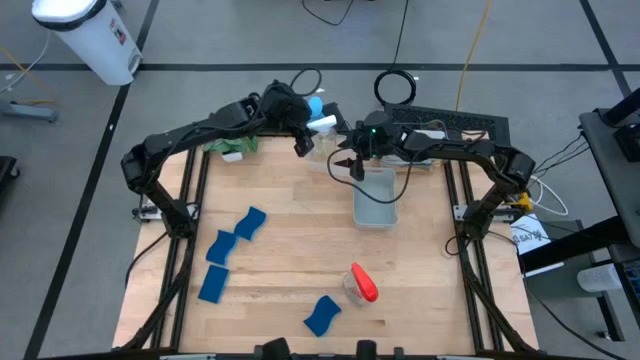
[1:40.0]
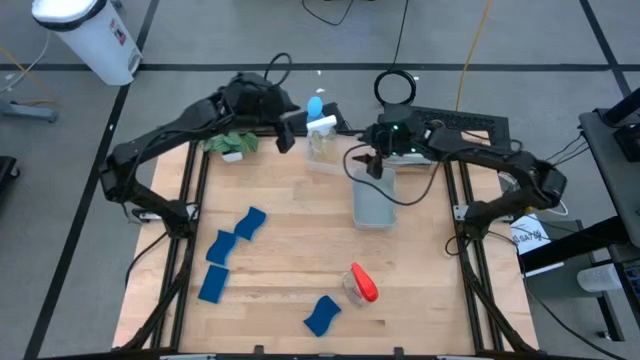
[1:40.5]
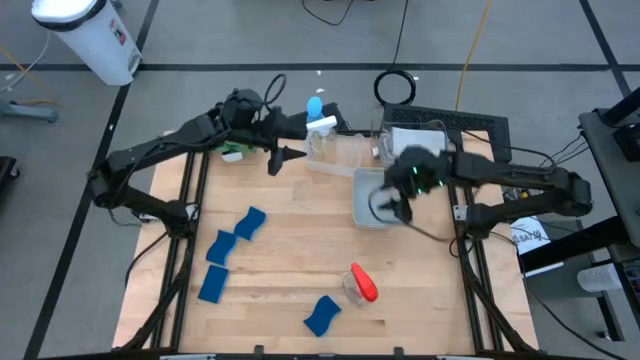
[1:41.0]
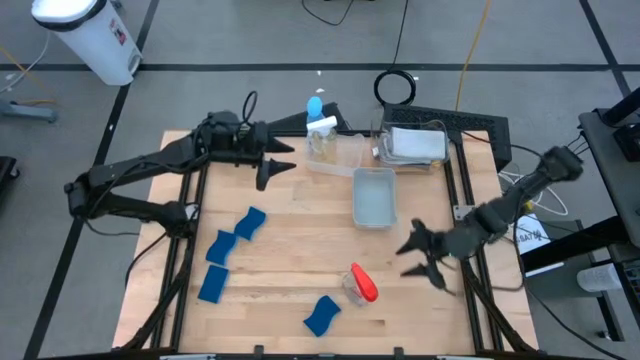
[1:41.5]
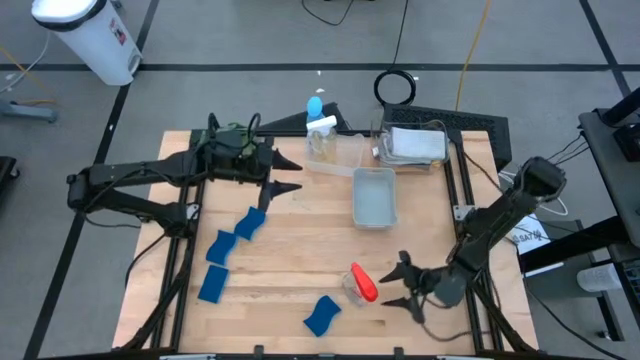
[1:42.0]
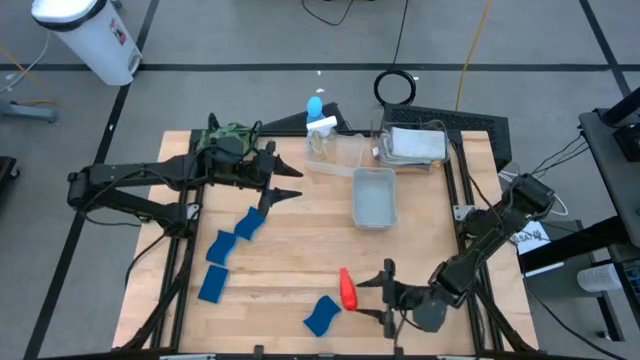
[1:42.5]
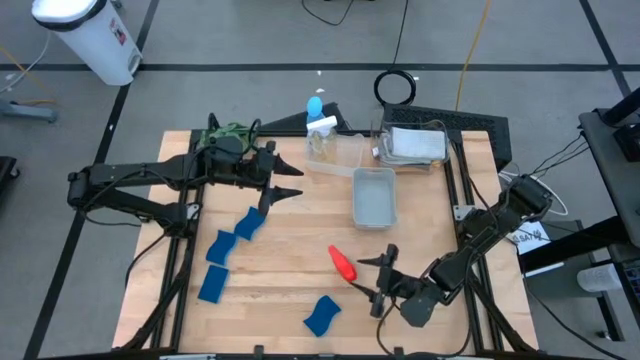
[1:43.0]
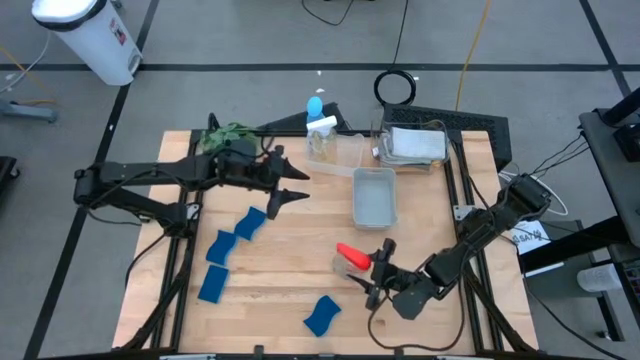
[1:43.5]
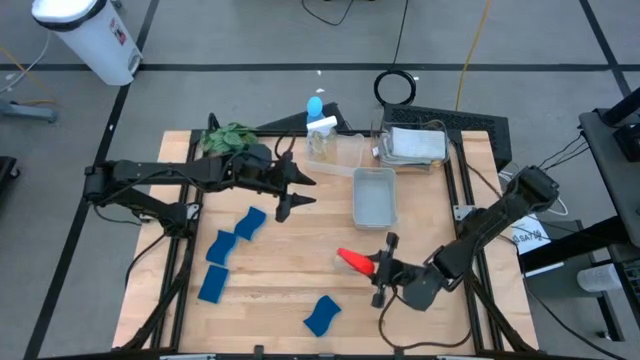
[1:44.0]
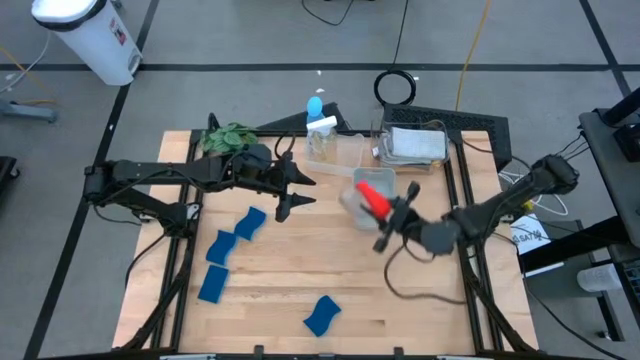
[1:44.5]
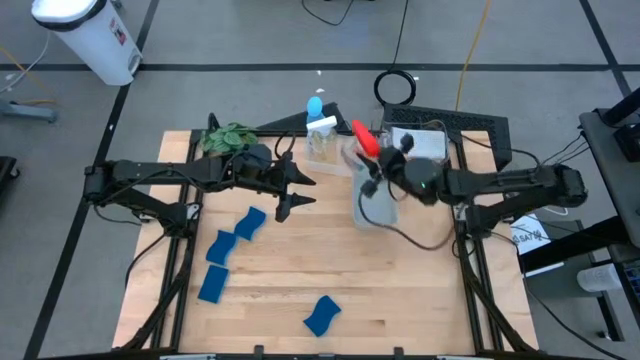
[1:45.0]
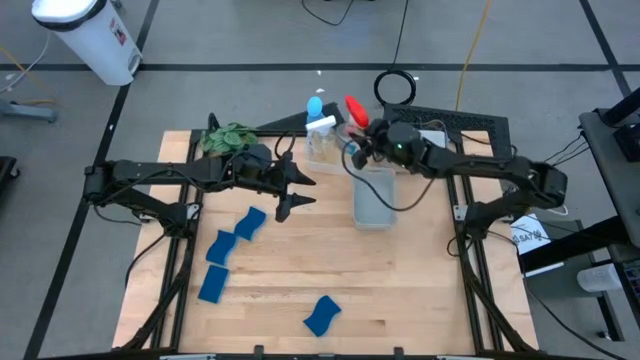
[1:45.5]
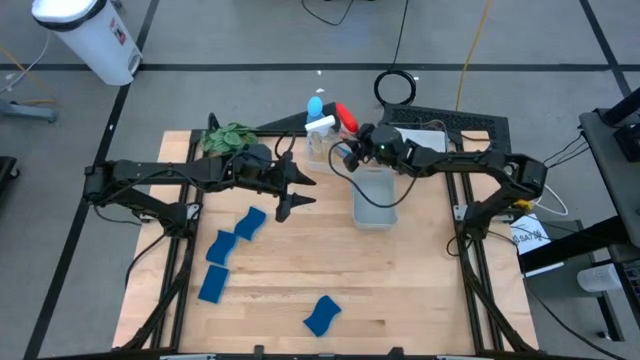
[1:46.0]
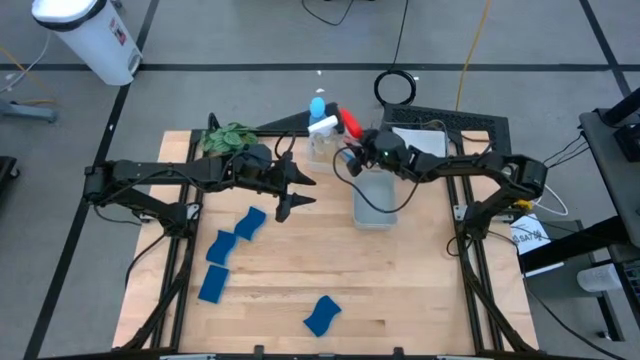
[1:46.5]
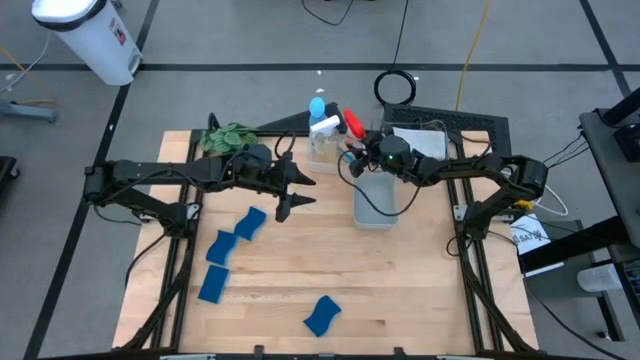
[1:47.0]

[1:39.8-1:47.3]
Task: Pick & Place Kitchen Items
Put the red spray bottle into the white bin

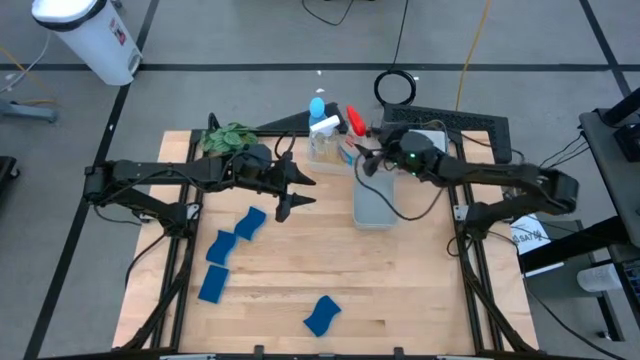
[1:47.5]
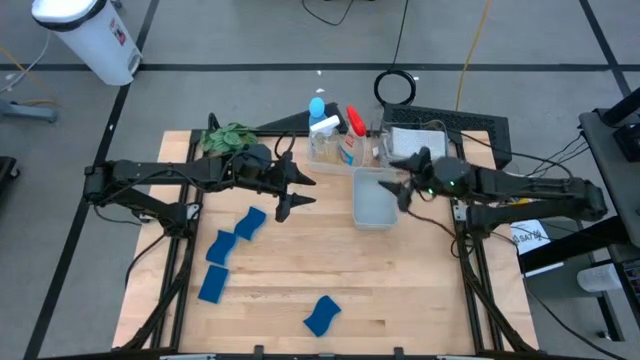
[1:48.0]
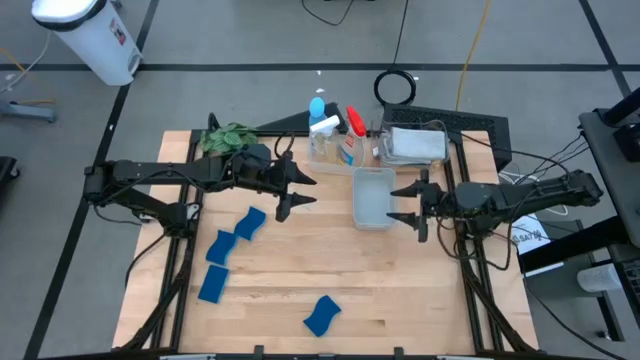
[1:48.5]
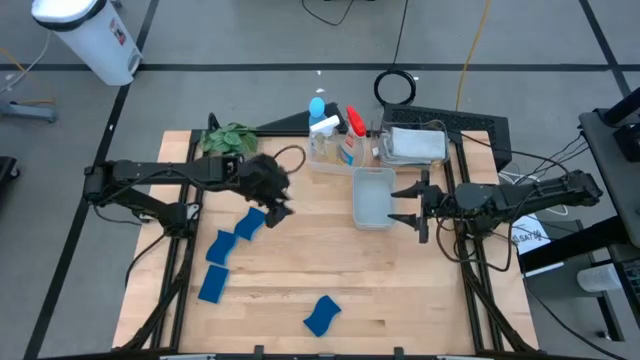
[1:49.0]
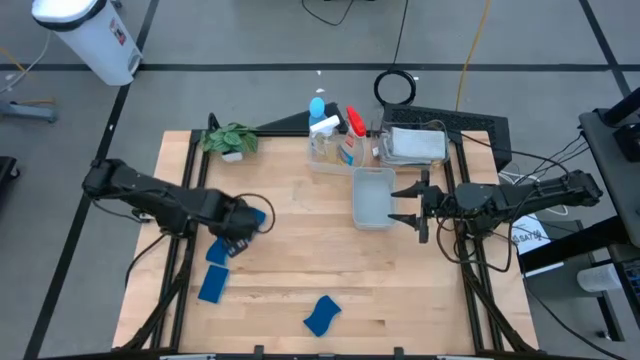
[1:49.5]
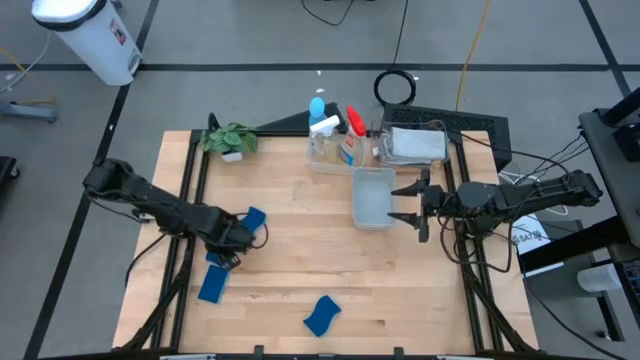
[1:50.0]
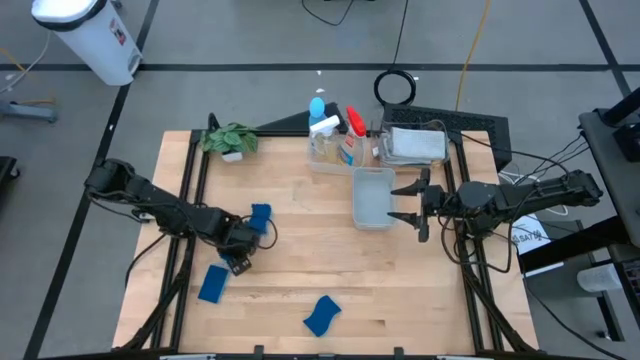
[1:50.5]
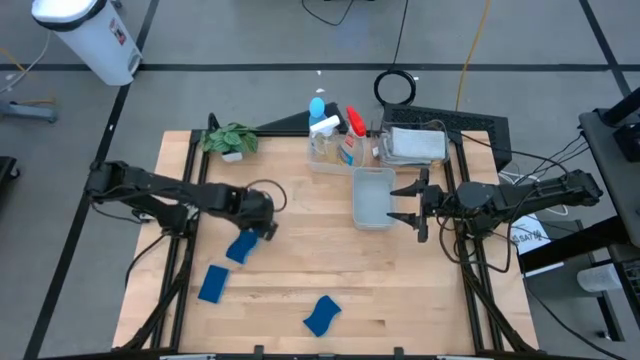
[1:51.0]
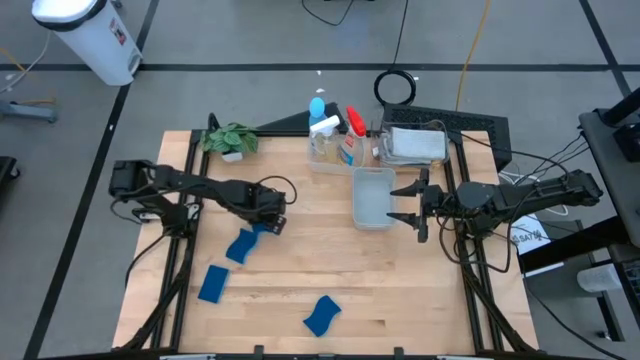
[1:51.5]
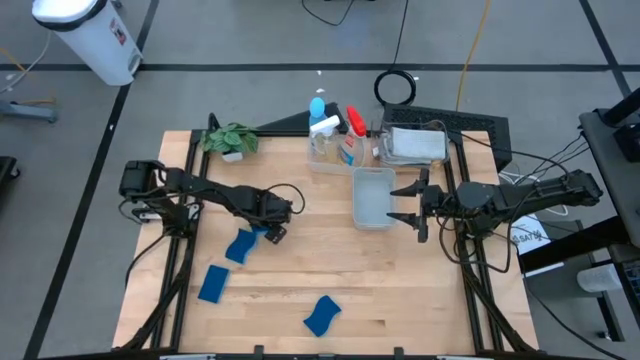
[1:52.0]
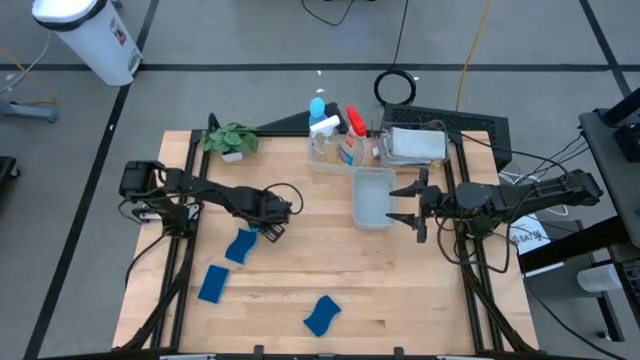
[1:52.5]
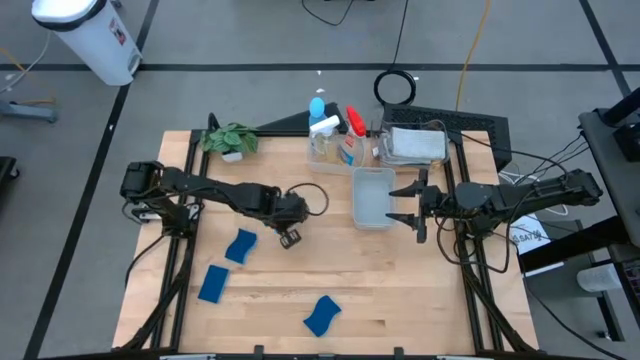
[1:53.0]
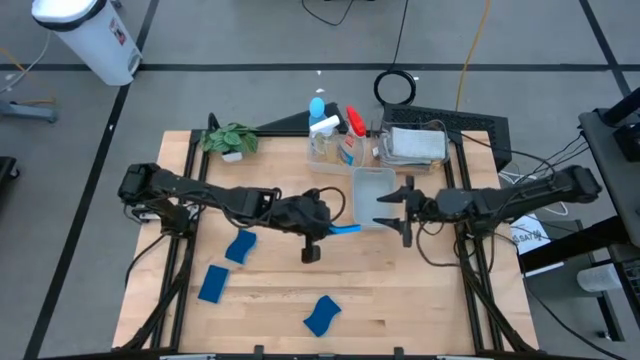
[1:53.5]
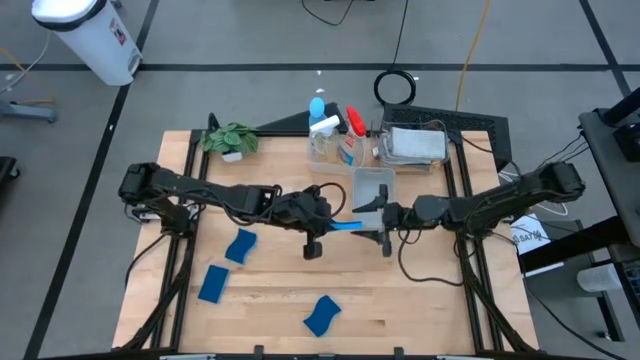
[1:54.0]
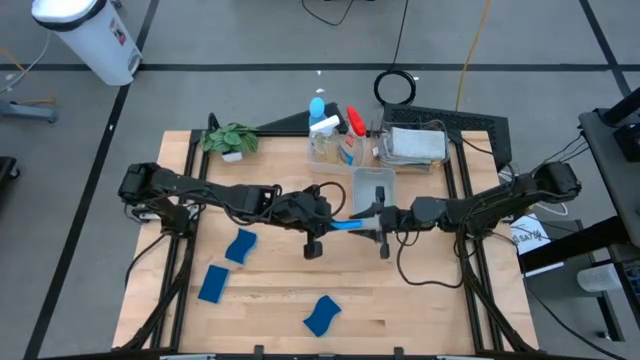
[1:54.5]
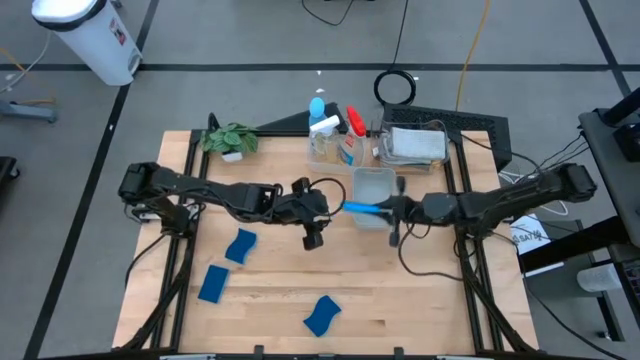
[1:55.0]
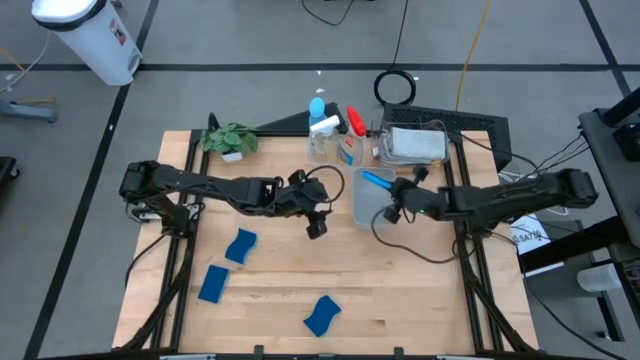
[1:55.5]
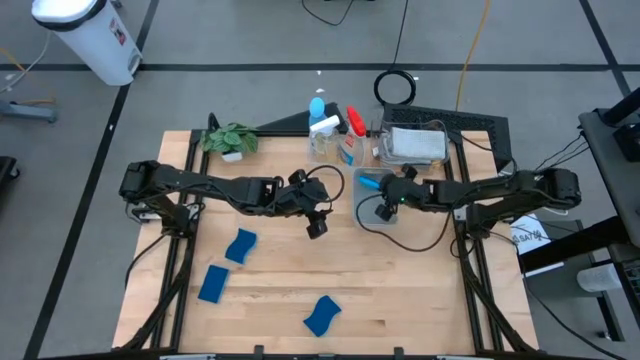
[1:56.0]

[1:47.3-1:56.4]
Put the blue sponge into the gray bin

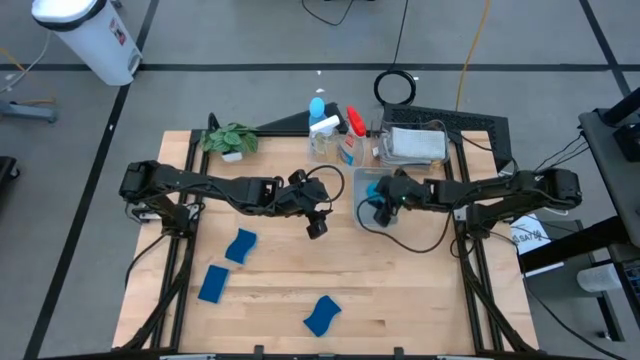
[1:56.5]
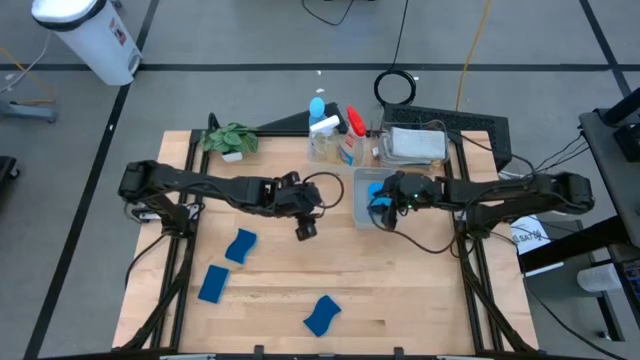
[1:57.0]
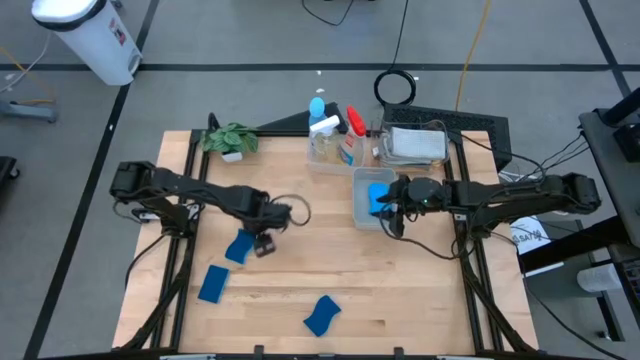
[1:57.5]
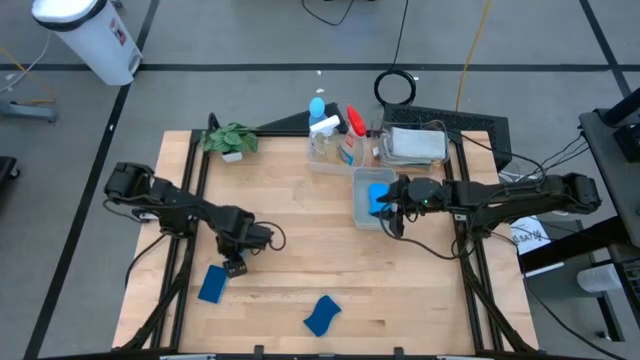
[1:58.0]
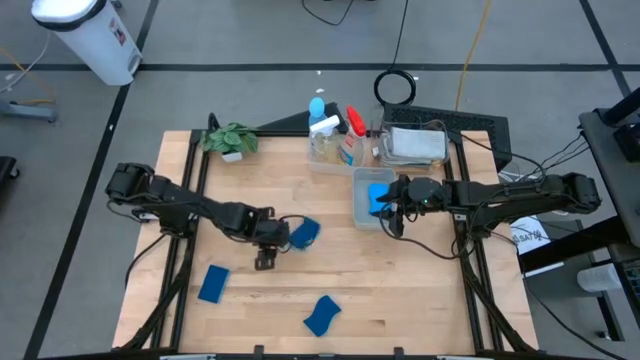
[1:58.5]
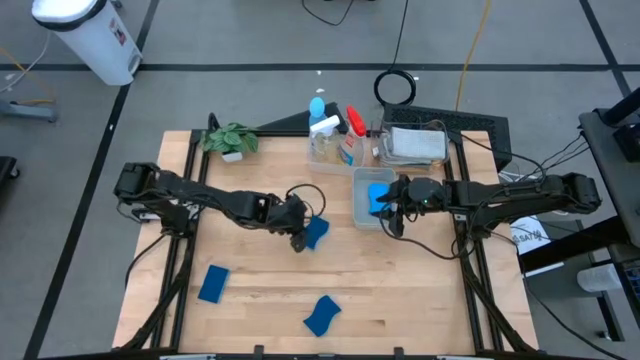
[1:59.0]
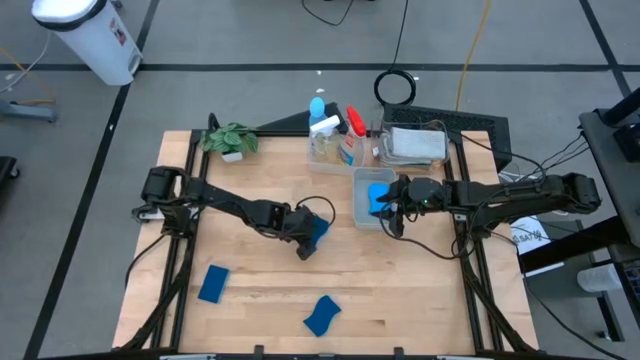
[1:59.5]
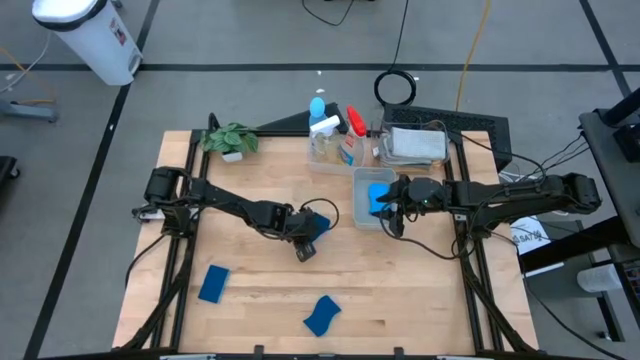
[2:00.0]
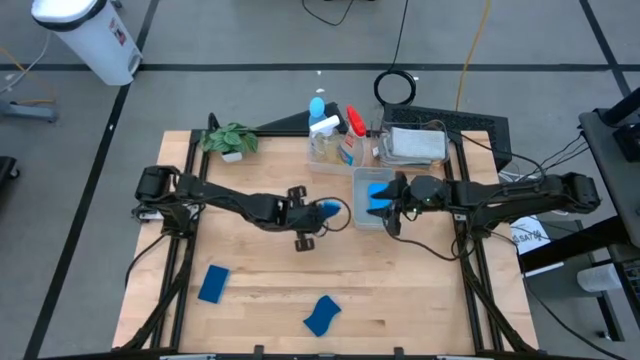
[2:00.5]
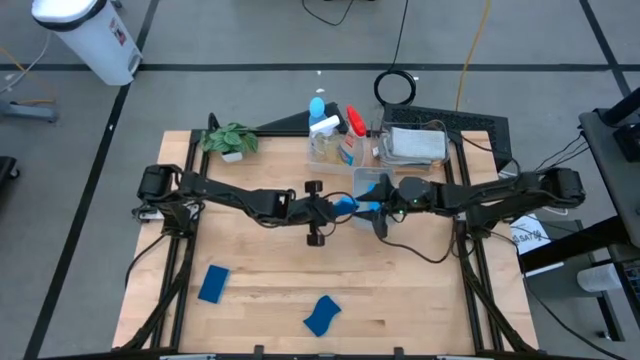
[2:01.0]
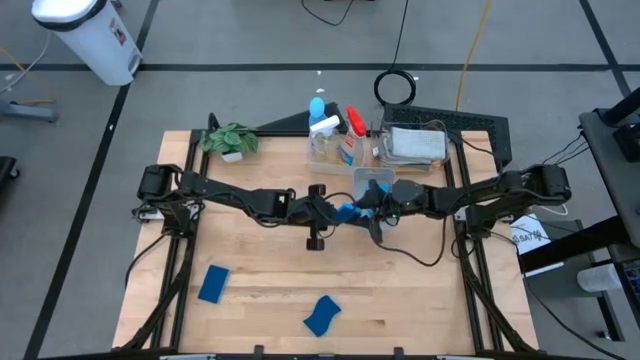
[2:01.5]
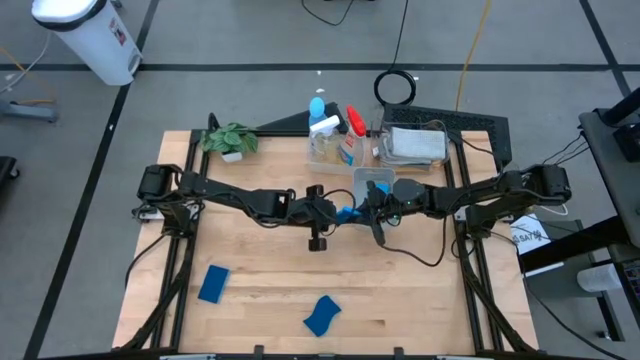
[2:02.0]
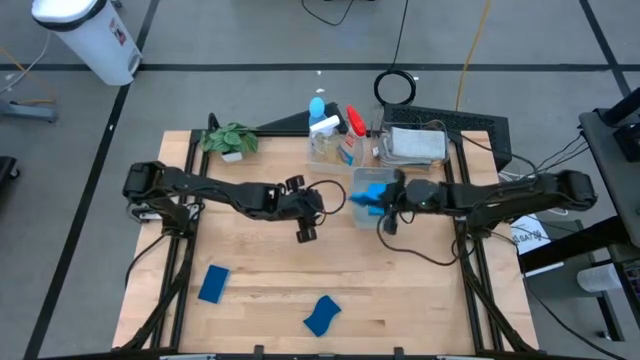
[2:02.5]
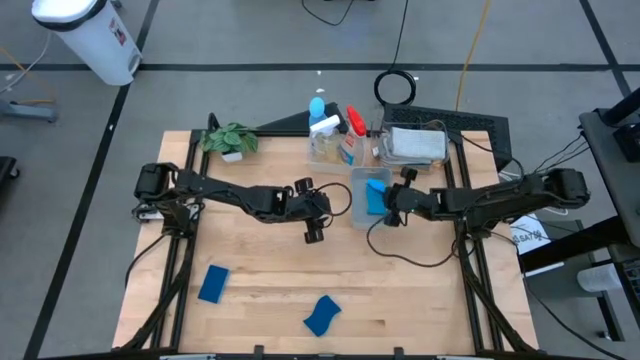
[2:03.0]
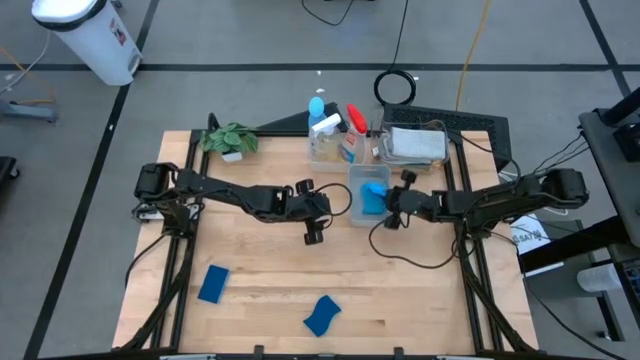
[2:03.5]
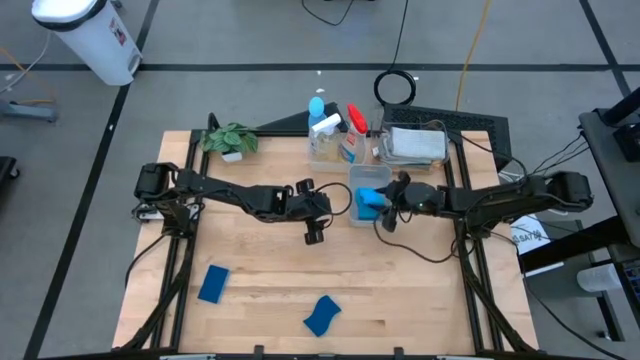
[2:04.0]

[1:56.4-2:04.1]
Put the blue sponge into the gray bin
